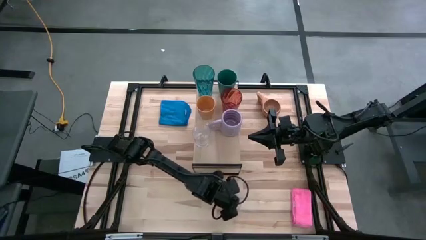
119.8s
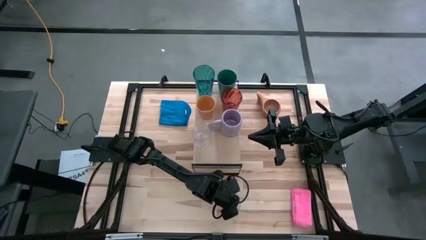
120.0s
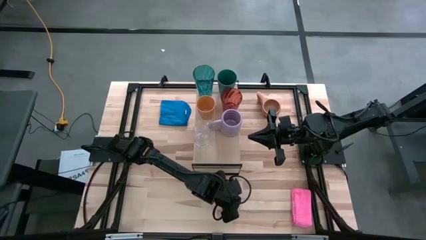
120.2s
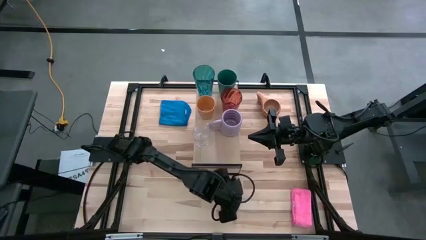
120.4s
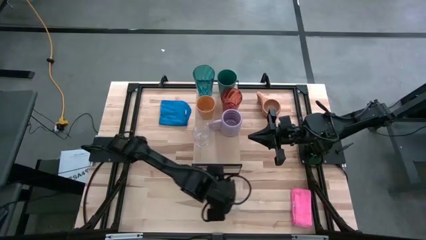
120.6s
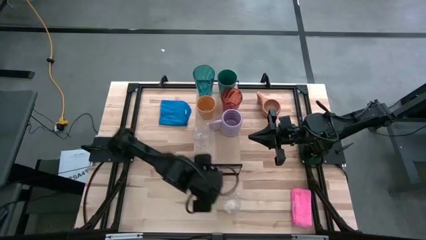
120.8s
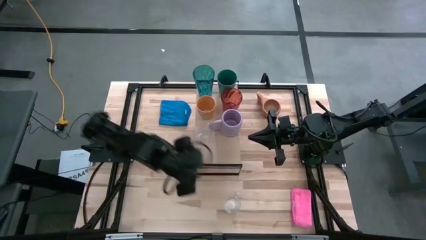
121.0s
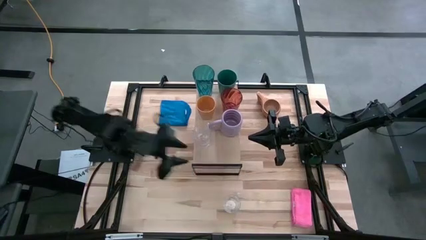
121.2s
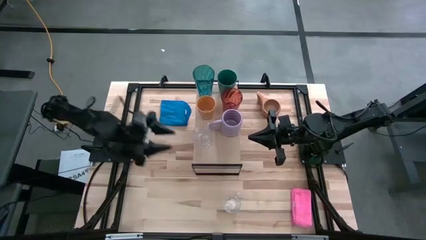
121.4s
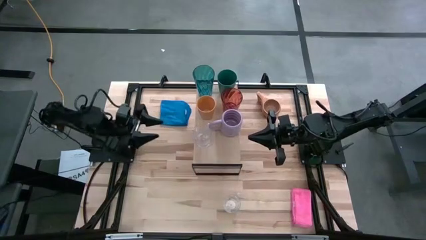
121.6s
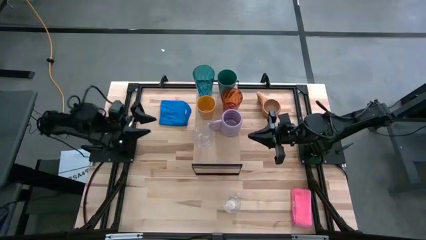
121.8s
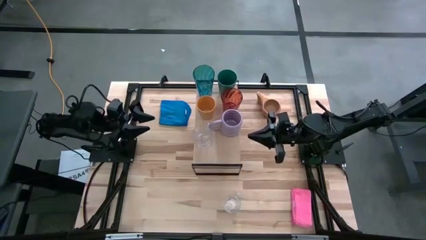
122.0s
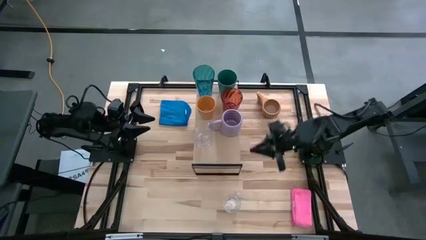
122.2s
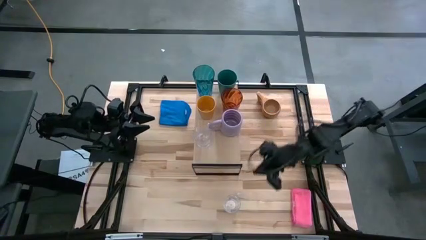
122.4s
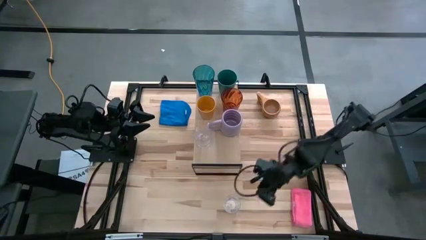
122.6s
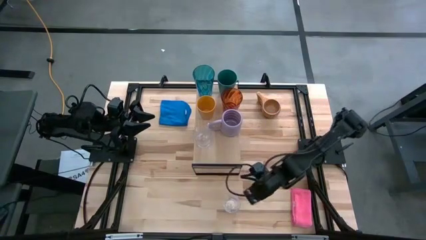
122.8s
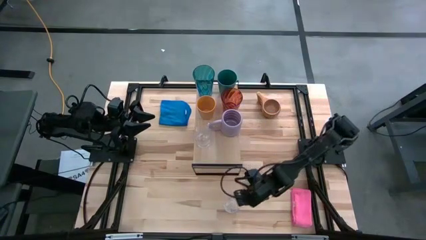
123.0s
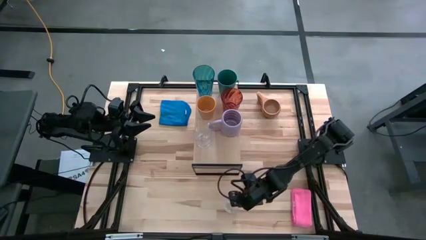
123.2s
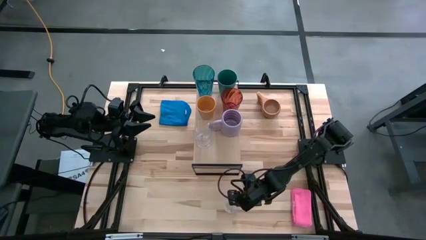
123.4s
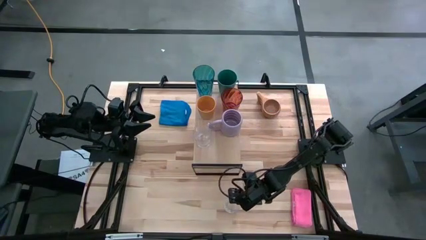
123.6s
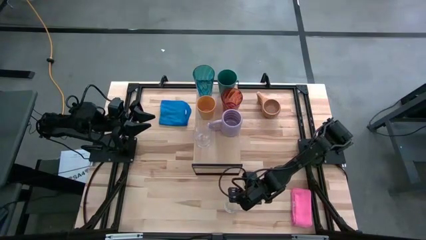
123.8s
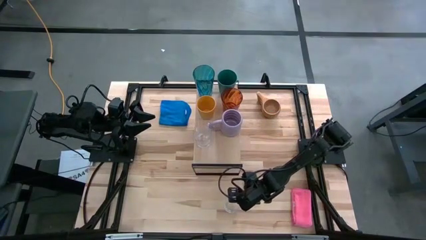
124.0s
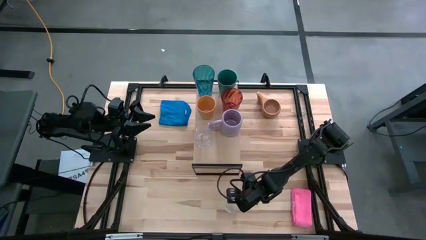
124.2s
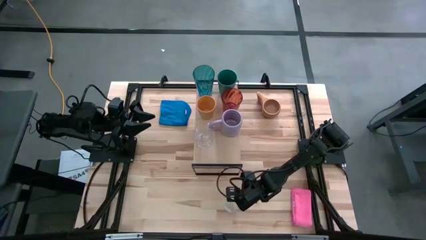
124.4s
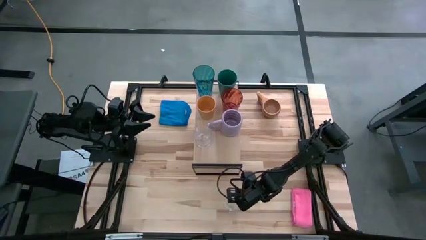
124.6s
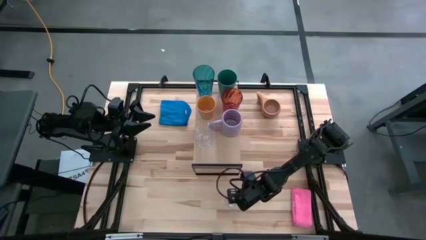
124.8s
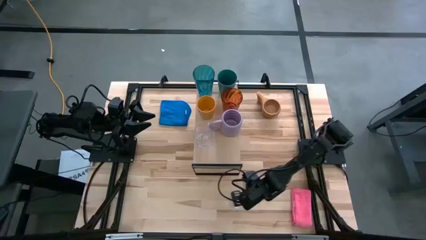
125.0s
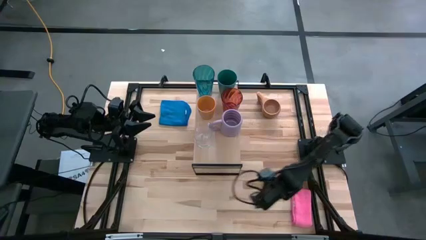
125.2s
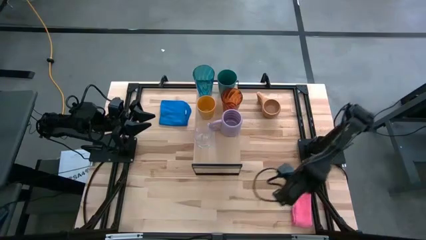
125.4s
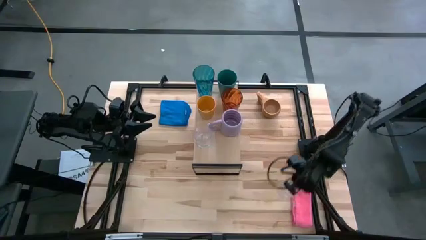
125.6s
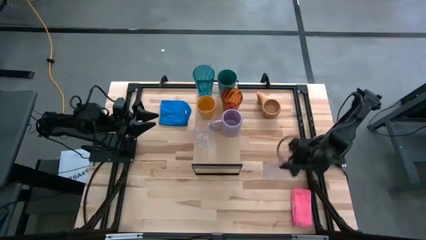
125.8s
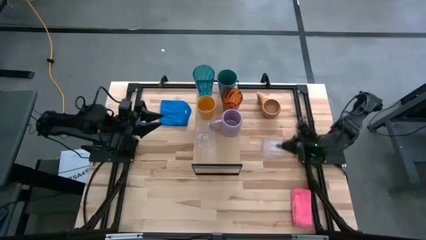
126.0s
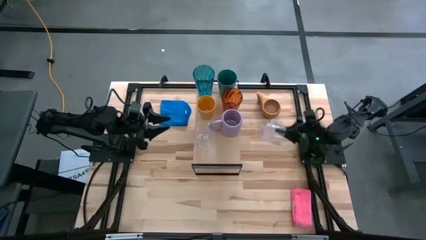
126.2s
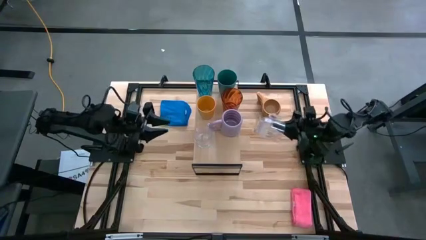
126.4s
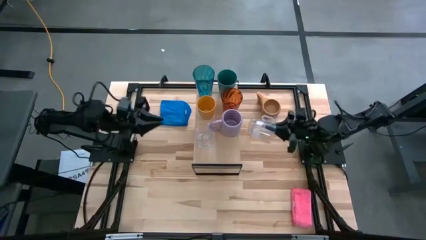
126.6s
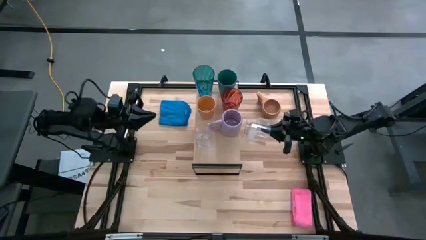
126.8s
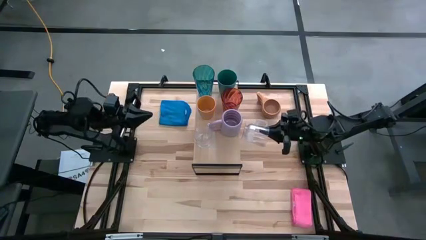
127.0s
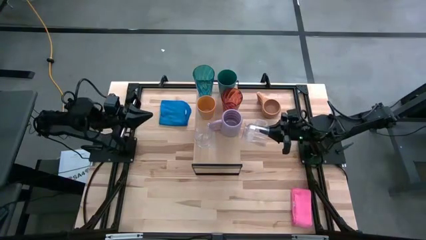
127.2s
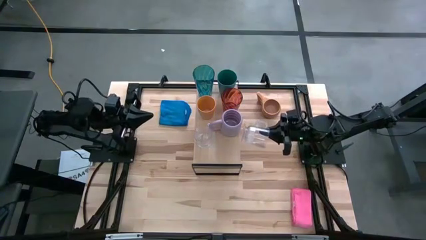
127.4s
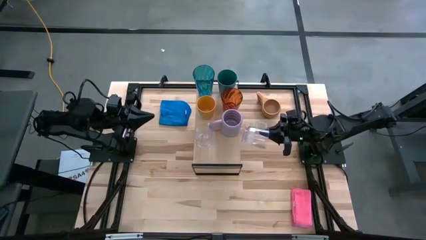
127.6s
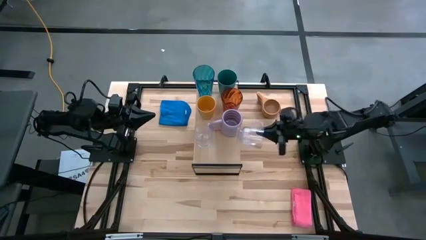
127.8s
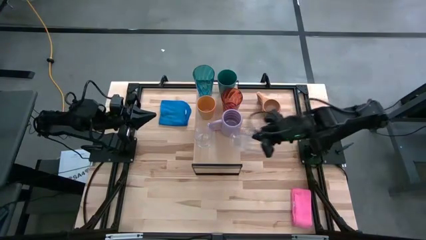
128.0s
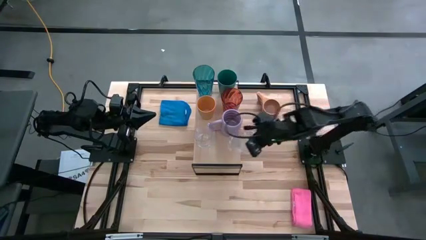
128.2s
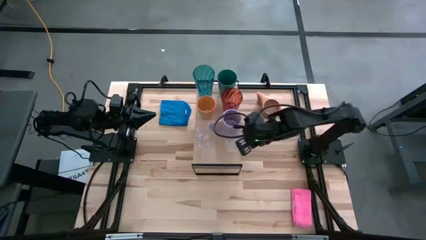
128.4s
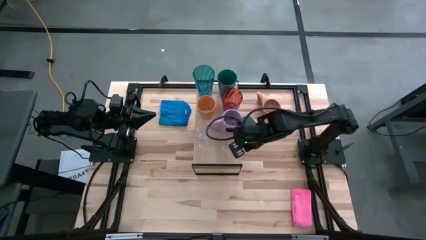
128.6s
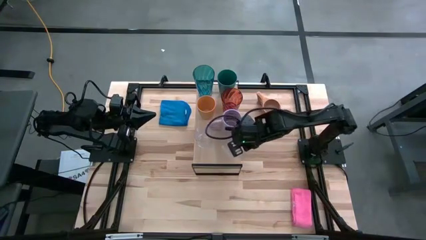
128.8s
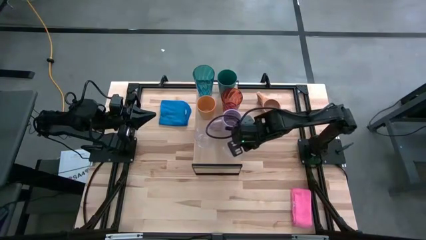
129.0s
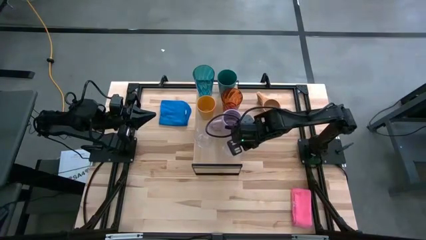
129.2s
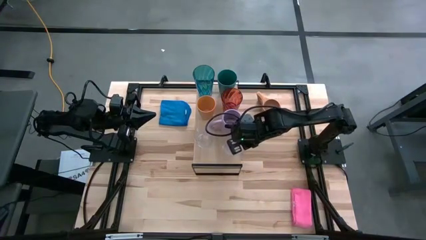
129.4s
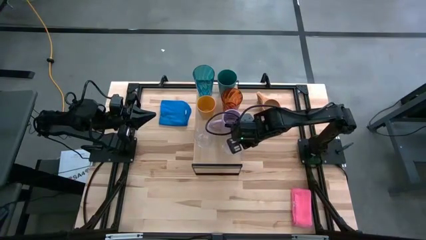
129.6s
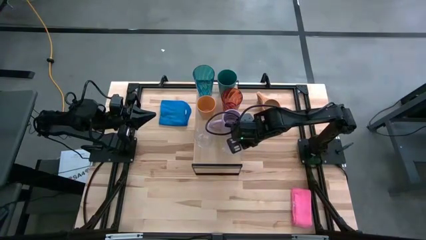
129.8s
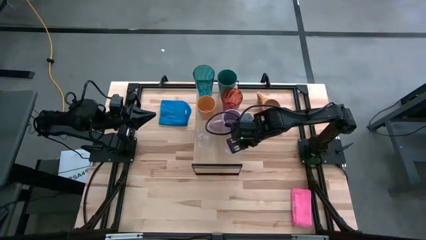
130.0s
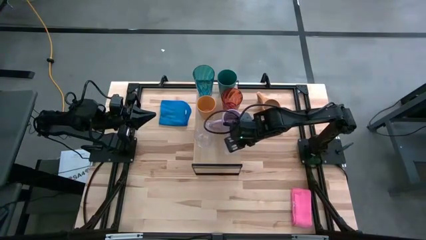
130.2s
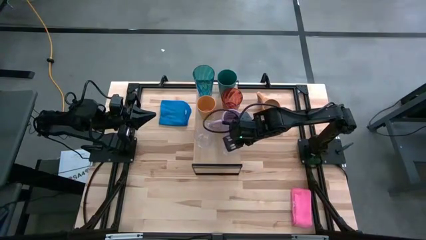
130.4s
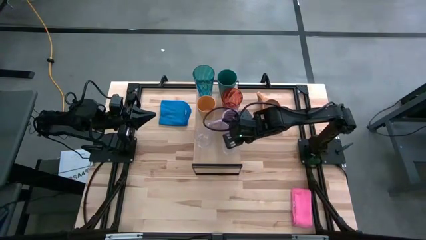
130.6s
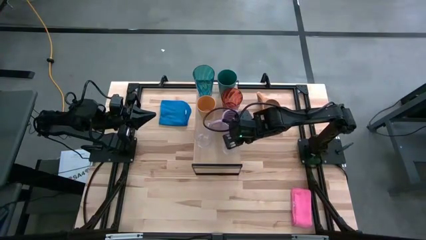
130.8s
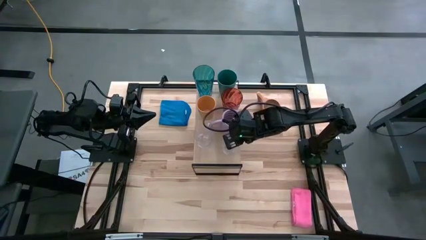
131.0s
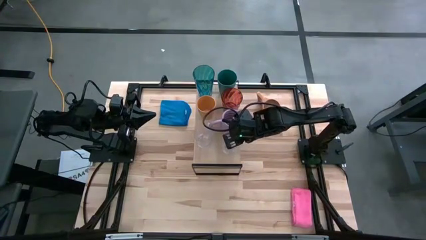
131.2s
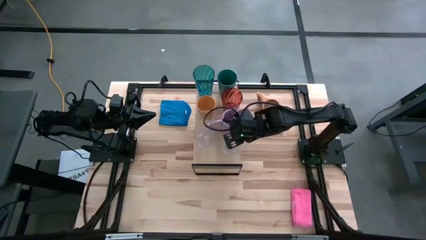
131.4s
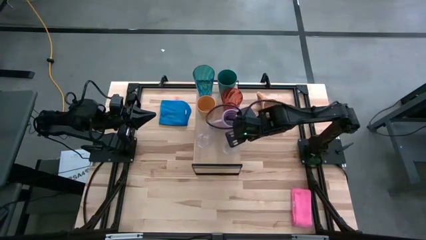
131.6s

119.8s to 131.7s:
Task: Stack small to large cups/mugs on shelf
Put the transparent mug on the shelf

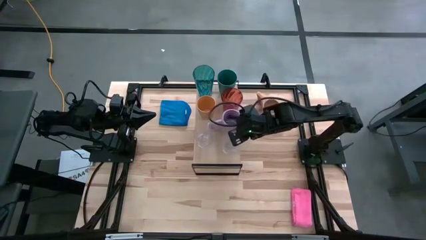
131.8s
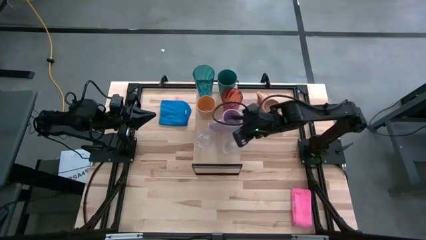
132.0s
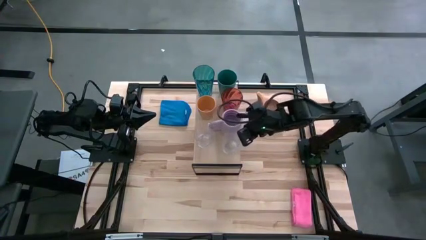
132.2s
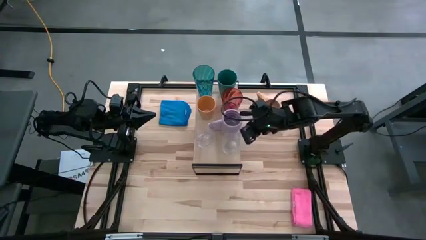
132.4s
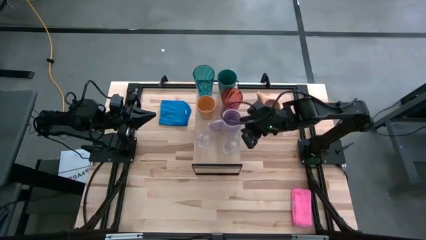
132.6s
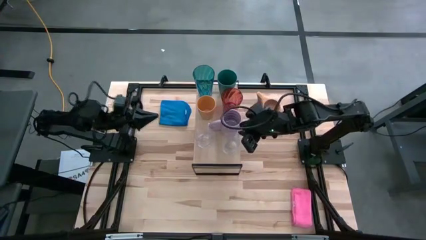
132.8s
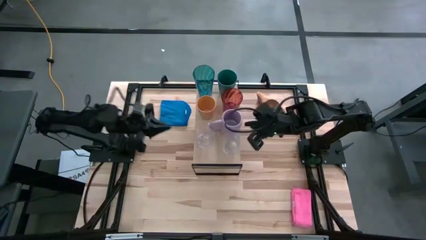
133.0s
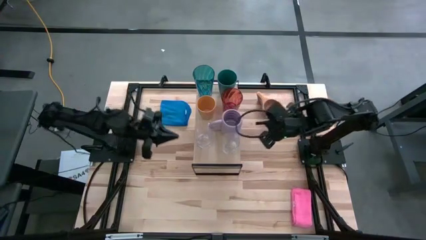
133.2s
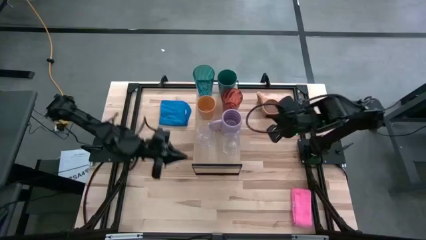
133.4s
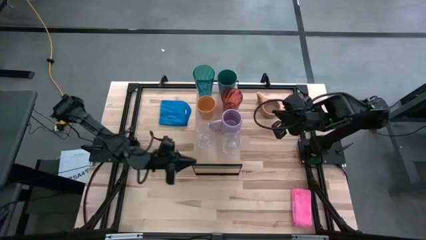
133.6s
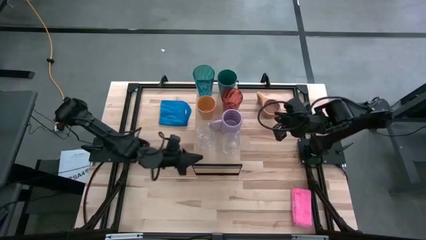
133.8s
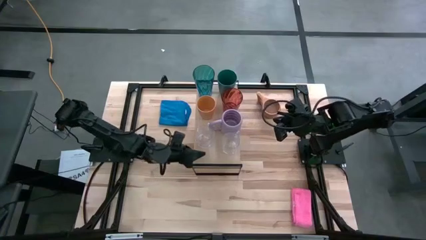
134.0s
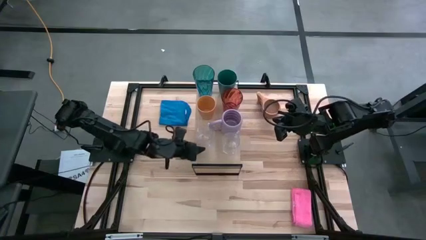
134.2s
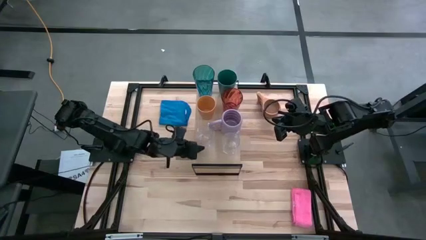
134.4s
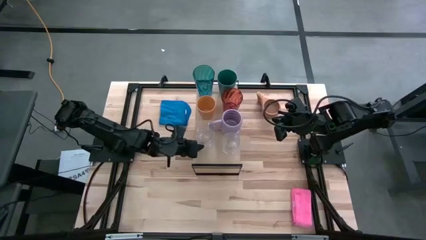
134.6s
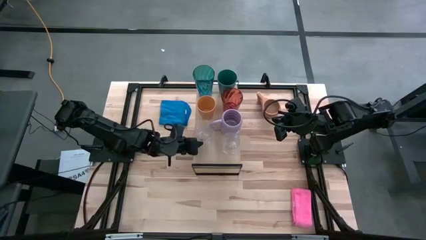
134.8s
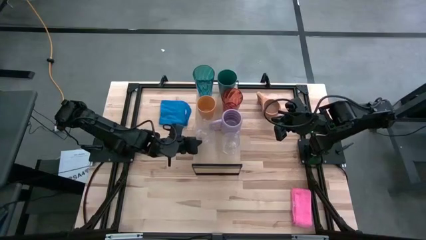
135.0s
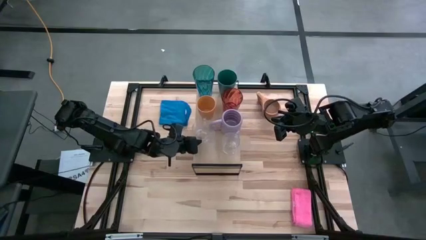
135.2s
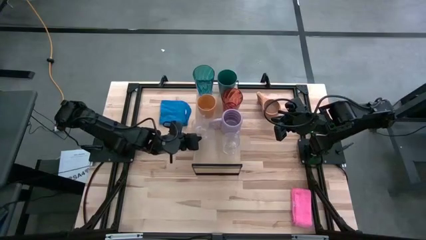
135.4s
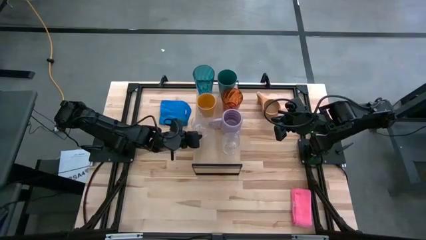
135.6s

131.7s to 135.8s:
Adjust the transparent mug on the shelf
